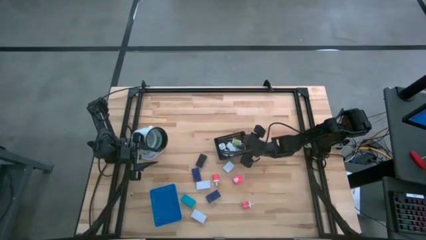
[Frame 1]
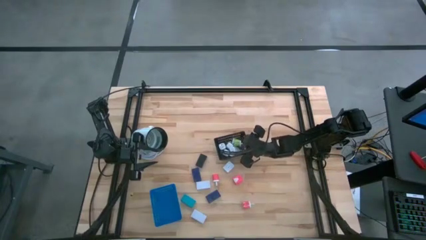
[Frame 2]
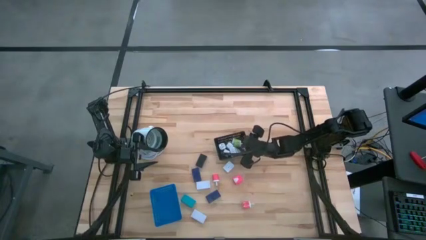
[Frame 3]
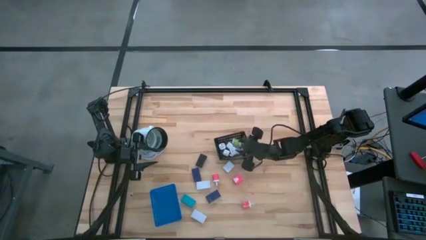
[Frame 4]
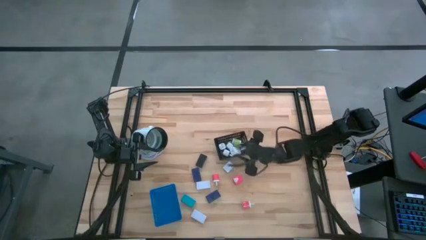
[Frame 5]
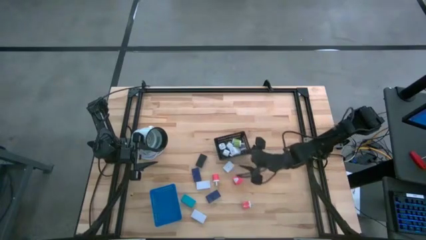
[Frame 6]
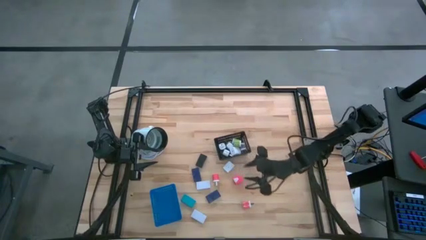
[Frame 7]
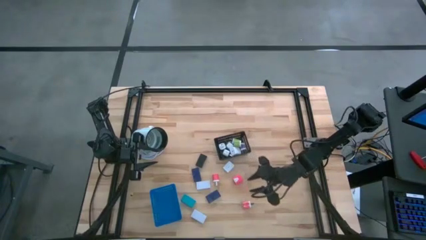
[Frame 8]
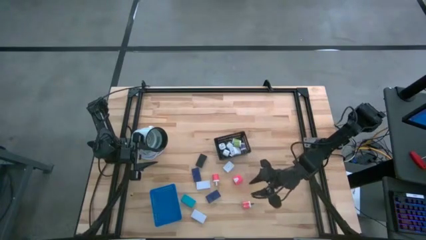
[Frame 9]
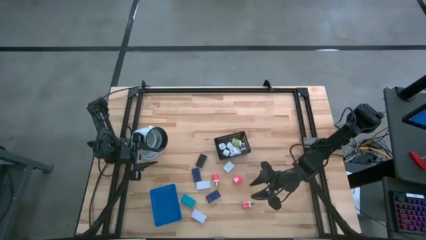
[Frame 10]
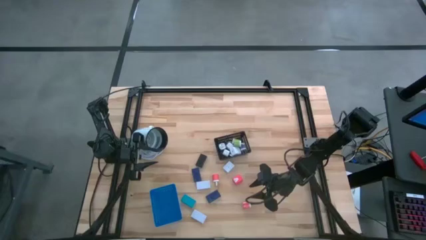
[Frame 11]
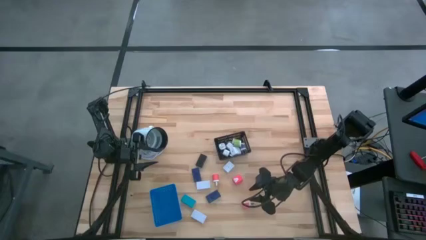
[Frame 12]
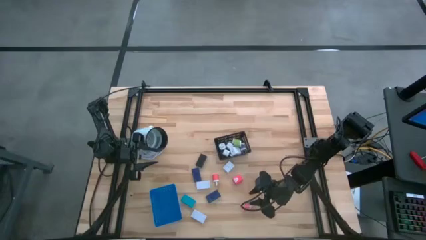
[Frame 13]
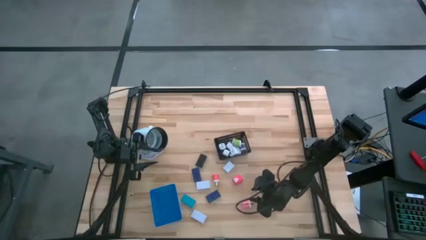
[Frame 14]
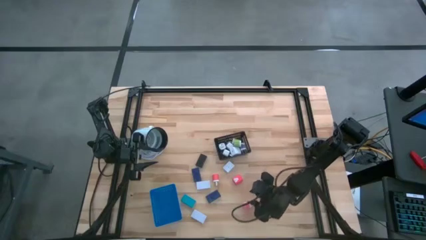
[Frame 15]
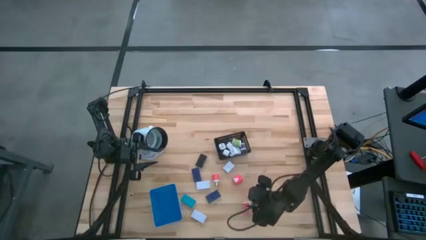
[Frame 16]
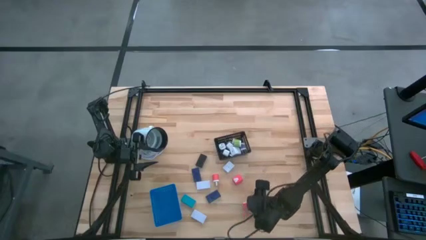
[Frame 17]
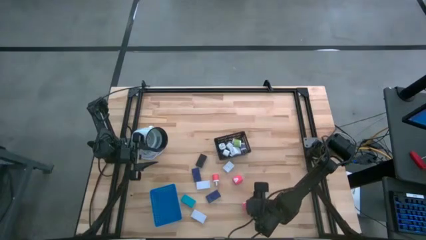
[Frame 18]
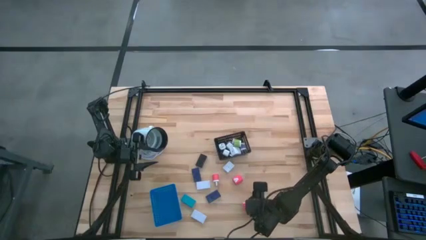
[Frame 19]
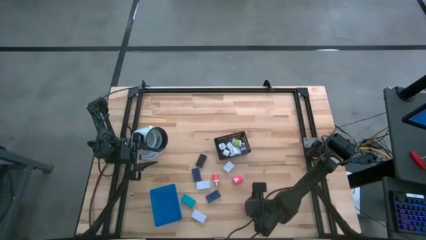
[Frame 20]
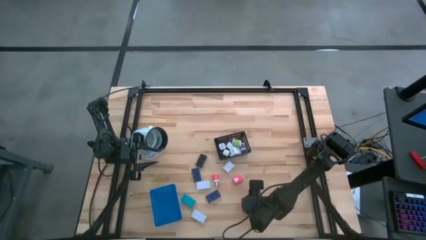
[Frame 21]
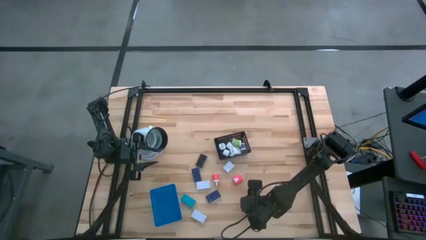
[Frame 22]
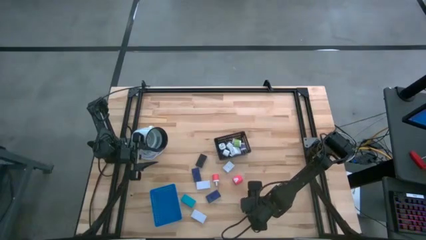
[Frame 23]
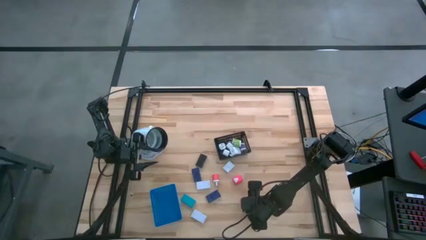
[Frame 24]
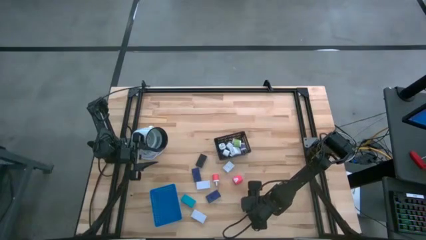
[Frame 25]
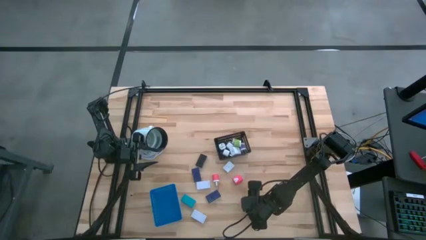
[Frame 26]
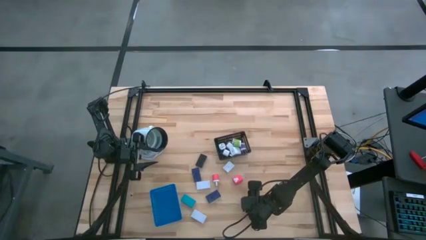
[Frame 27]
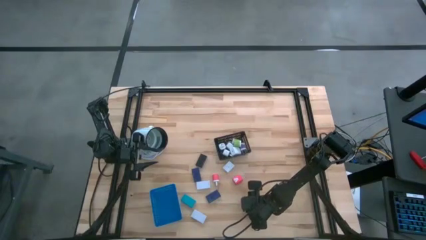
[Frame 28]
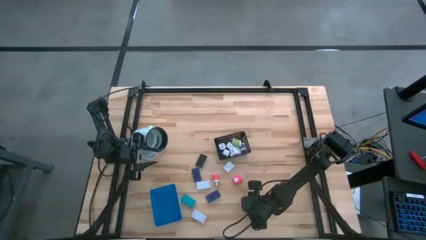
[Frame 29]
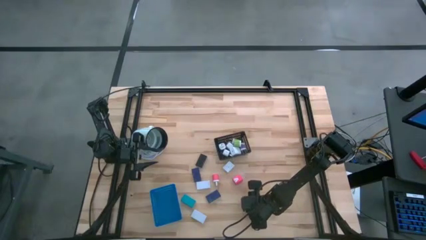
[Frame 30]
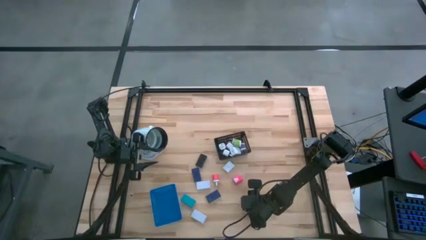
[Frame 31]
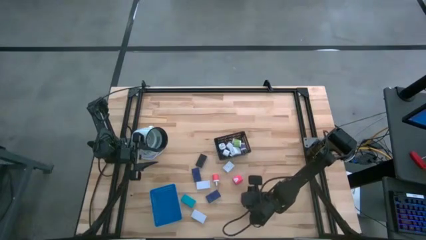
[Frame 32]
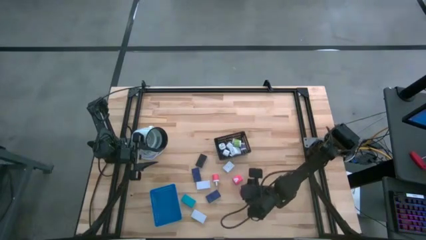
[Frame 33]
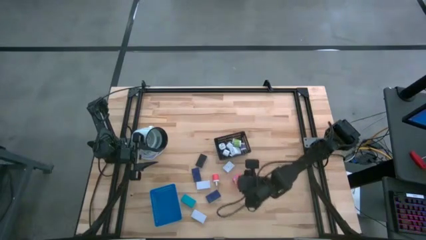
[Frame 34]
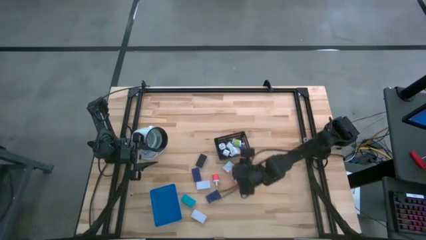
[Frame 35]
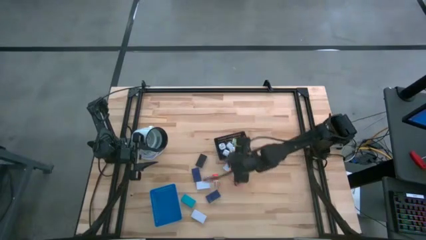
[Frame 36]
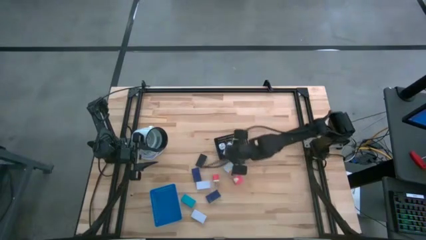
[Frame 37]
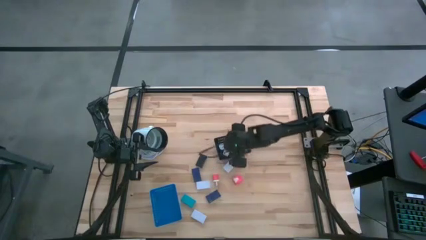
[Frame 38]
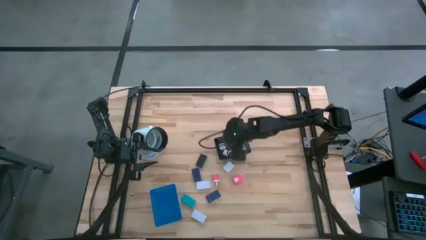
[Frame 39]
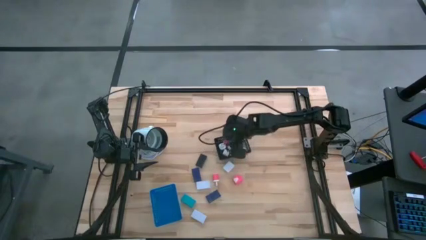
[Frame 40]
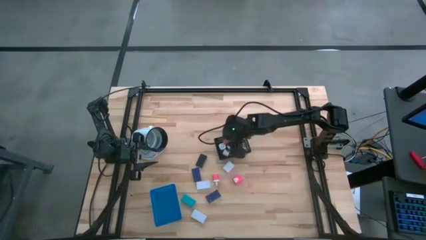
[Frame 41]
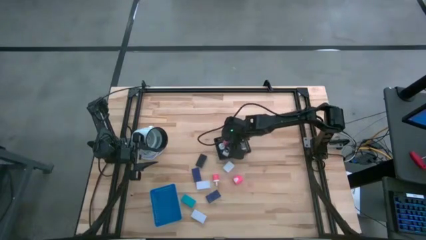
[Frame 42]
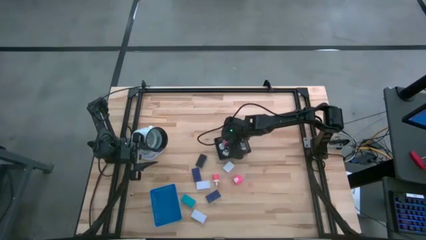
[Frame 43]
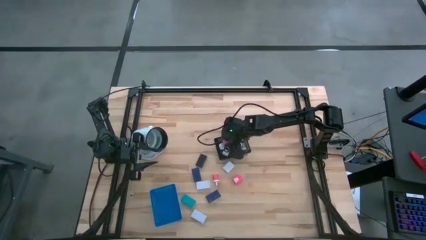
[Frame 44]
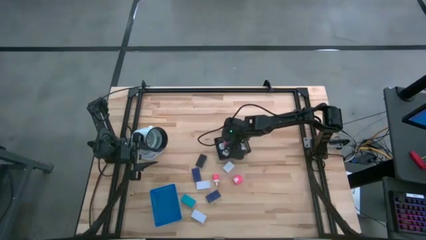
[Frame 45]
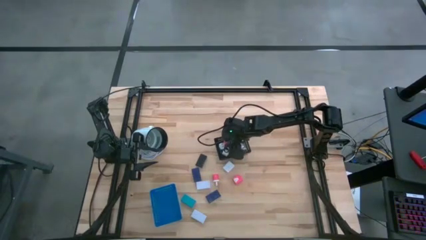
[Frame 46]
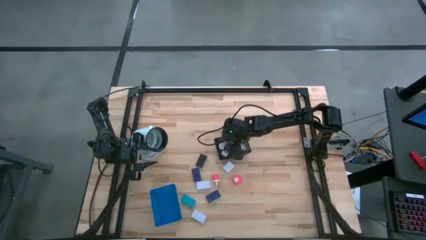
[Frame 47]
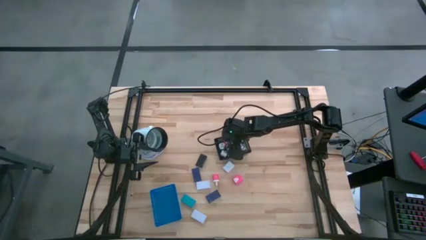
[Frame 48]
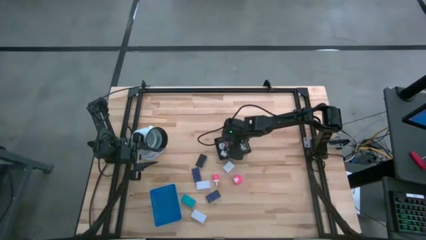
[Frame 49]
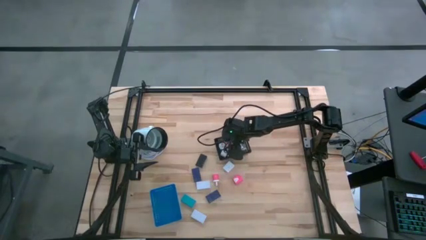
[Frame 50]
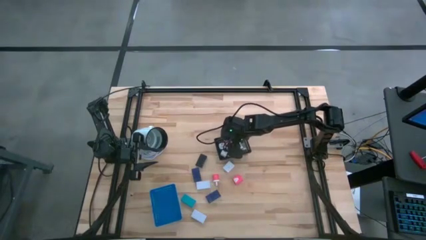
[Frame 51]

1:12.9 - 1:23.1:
Task: Pick & Place Office items
Put the bottom pink white charger adapter into the black bin

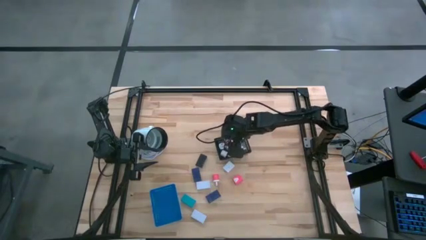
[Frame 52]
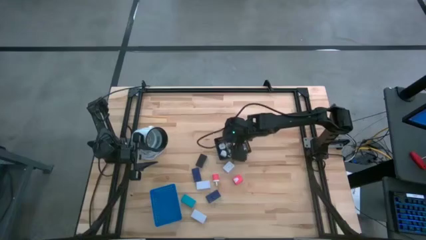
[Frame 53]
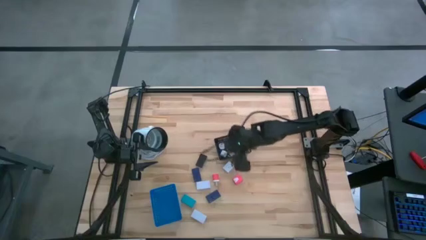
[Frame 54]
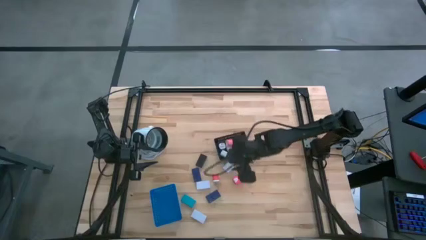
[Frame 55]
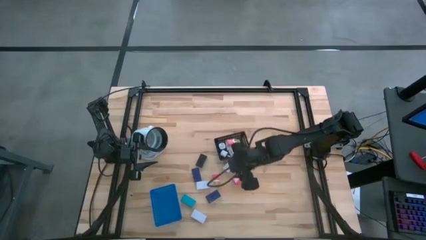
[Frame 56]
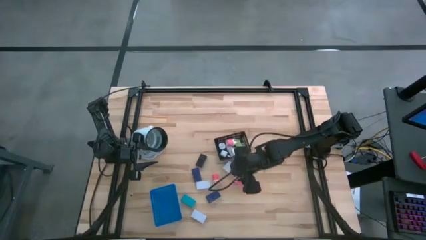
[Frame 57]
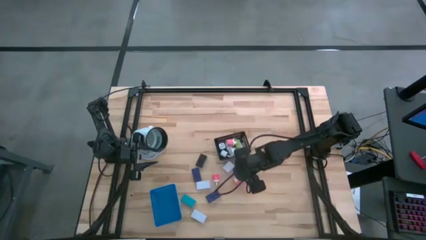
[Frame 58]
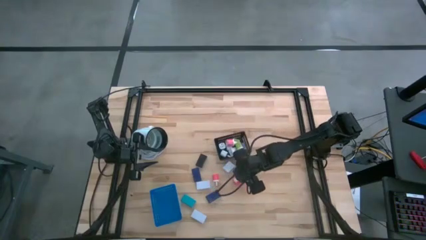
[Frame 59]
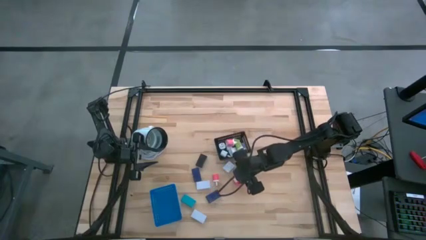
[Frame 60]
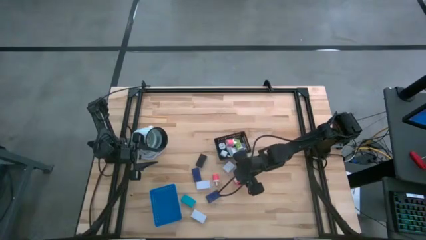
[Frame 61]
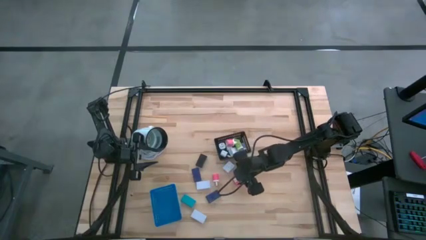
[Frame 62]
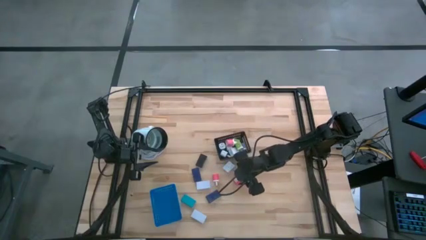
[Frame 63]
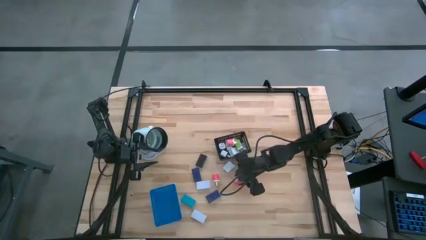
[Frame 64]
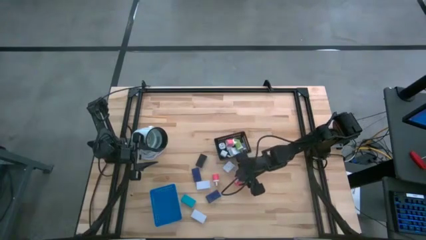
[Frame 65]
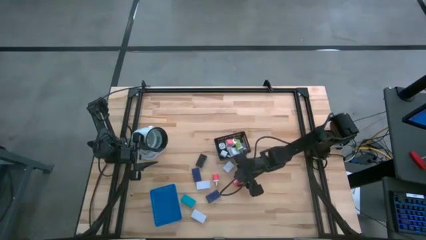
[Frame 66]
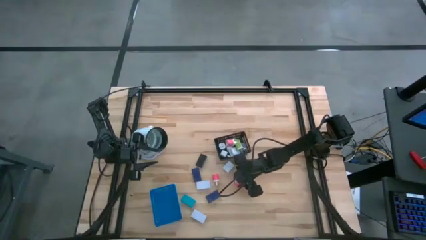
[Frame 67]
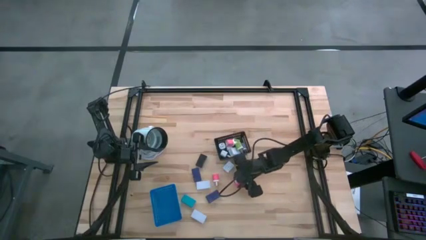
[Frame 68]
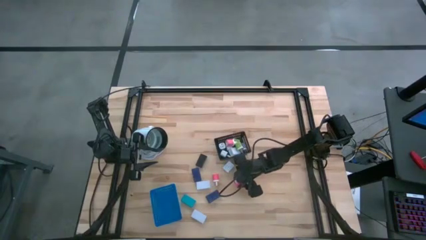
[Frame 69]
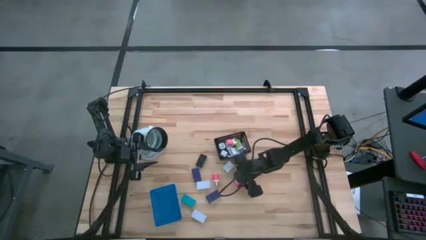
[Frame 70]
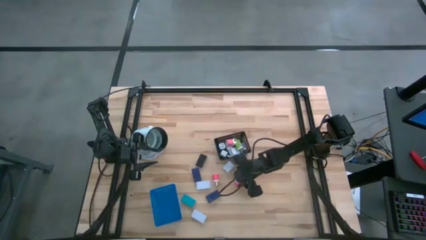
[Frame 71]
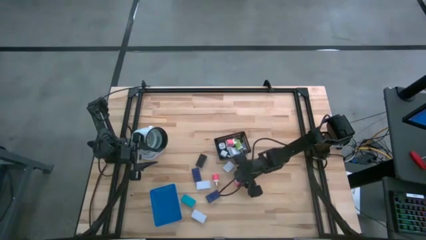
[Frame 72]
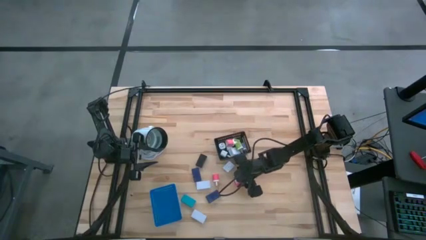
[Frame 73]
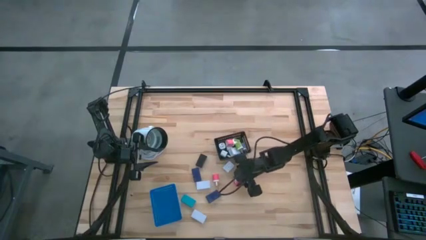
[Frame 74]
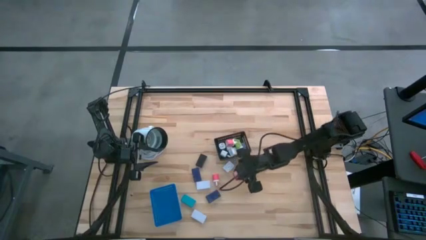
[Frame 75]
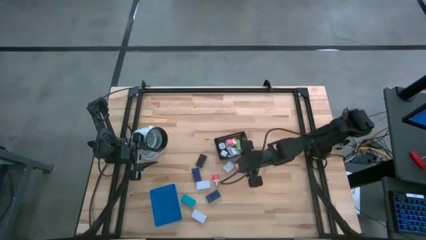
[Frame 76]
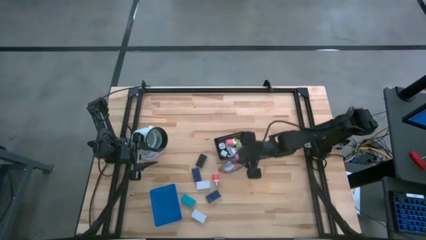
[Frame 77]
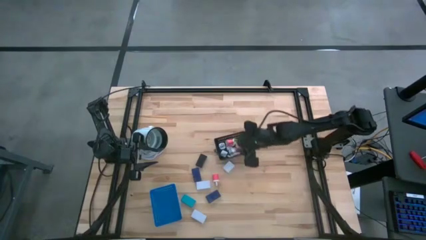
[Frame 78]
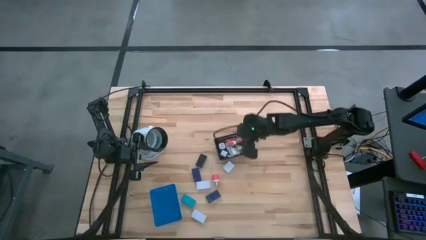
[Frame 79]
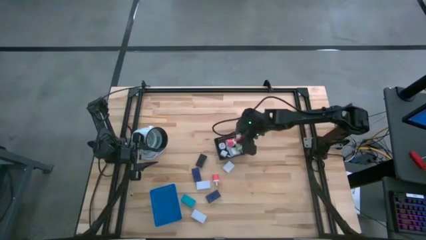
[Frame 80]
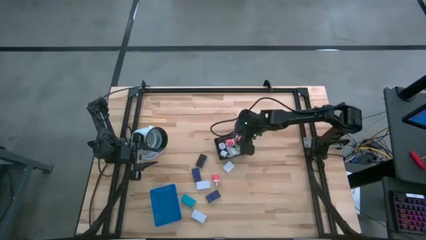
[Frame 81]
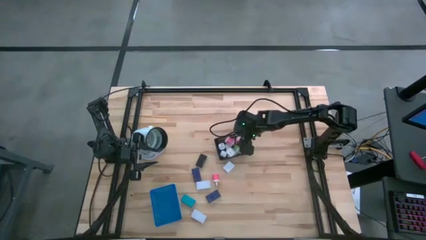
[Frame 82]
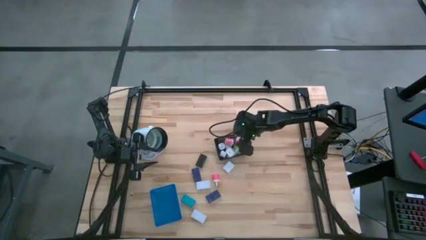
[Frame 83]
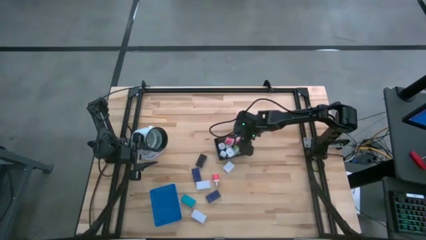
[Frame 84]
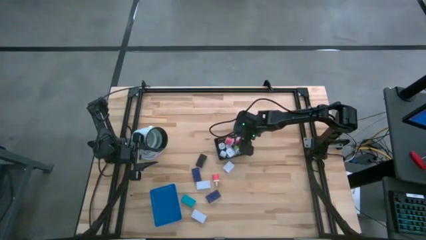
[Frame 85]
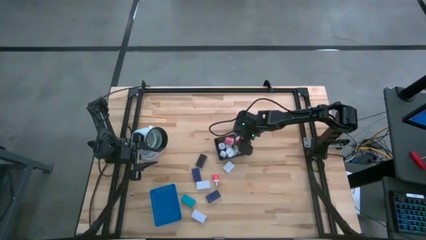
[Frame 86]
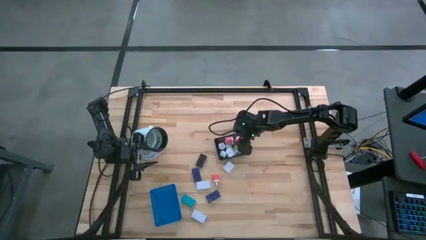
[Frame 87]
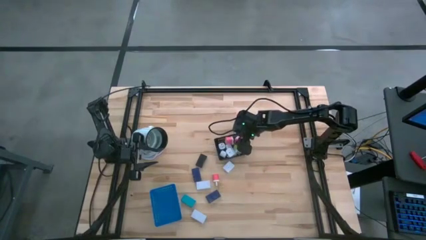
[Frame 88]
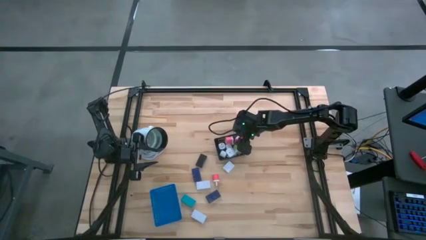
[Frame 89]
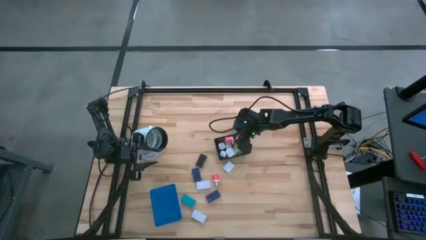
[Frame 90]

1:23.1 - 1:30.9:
Put the pink charger adapter into the black bin
